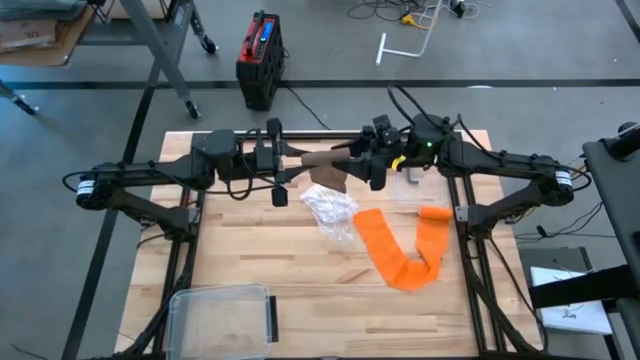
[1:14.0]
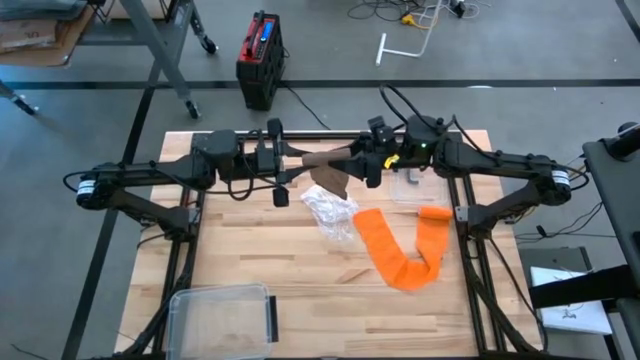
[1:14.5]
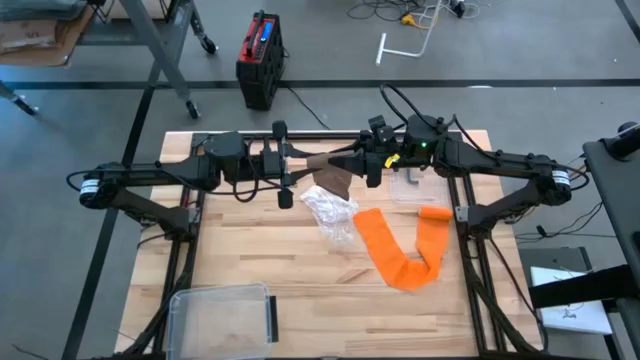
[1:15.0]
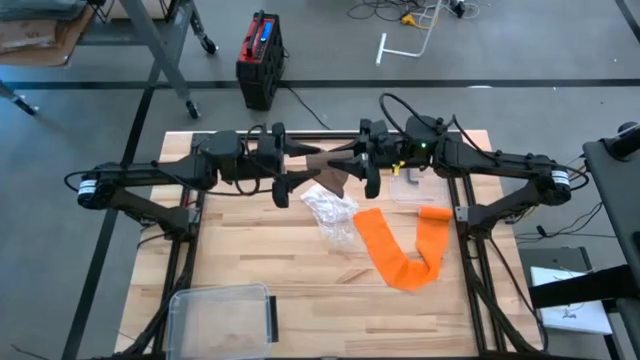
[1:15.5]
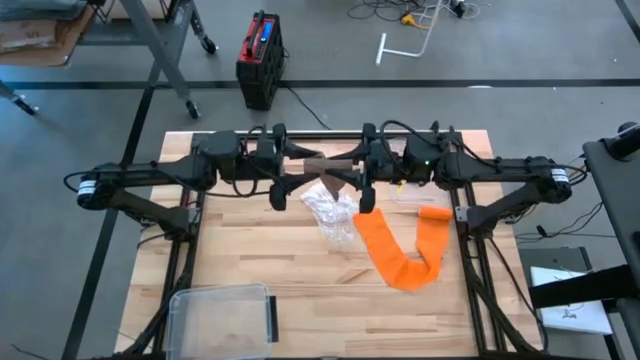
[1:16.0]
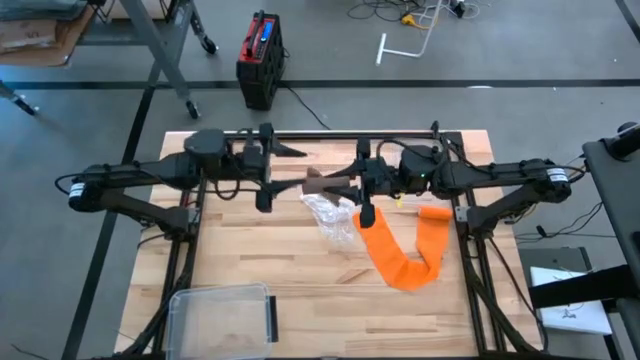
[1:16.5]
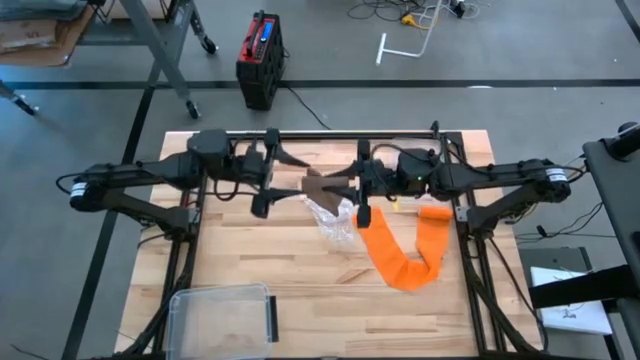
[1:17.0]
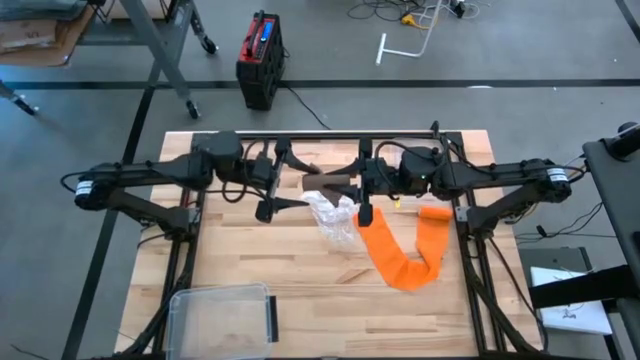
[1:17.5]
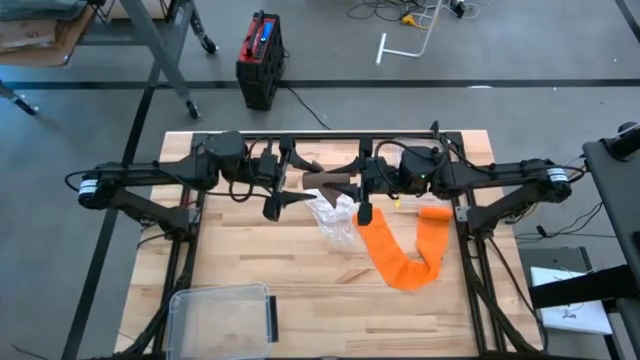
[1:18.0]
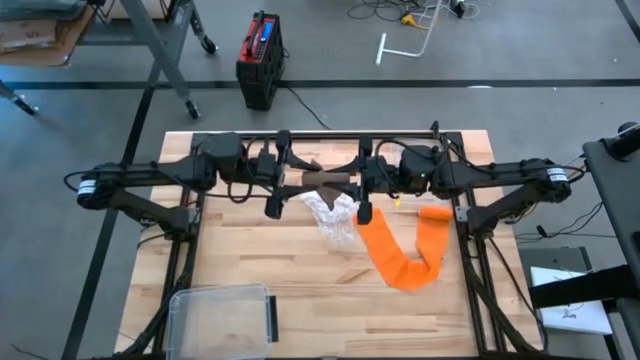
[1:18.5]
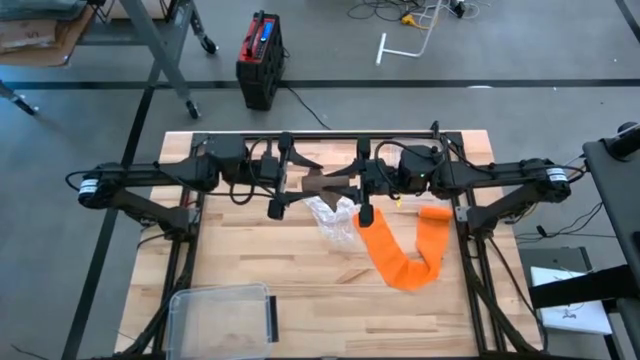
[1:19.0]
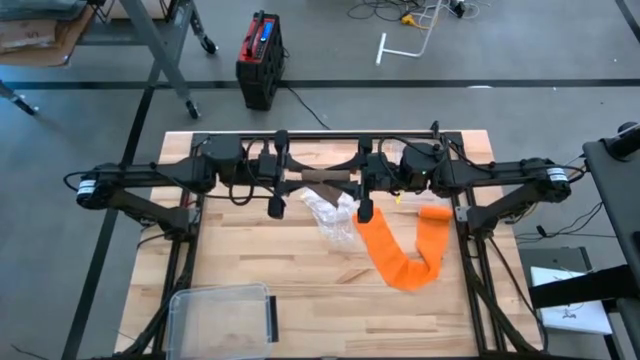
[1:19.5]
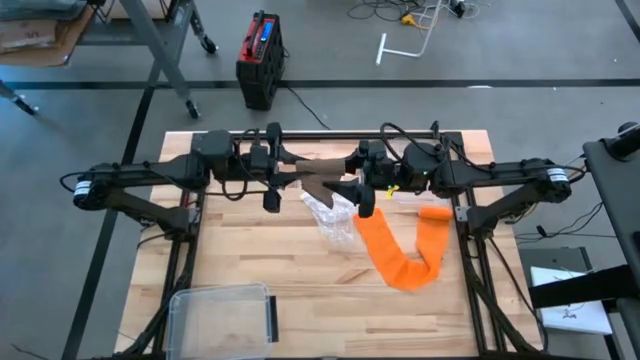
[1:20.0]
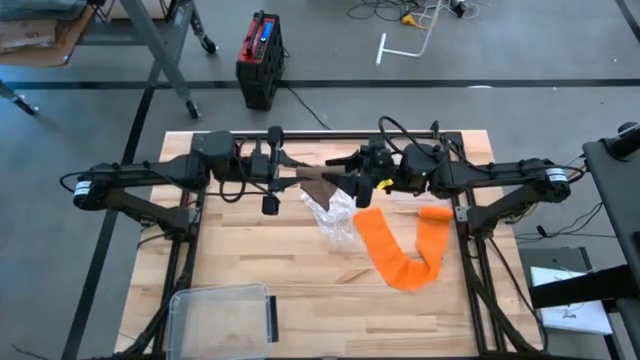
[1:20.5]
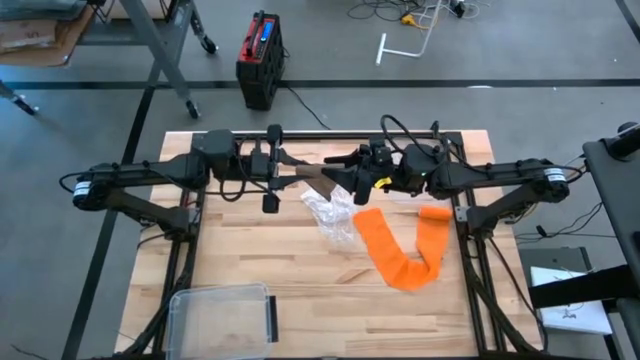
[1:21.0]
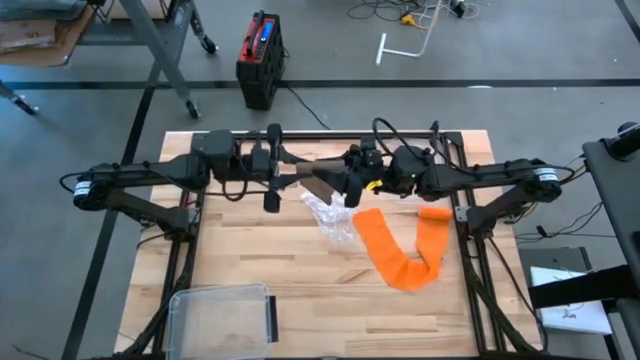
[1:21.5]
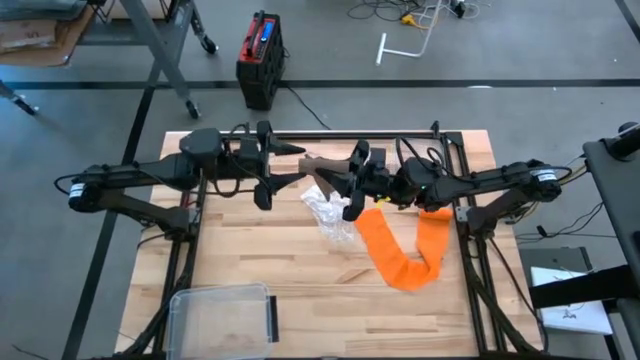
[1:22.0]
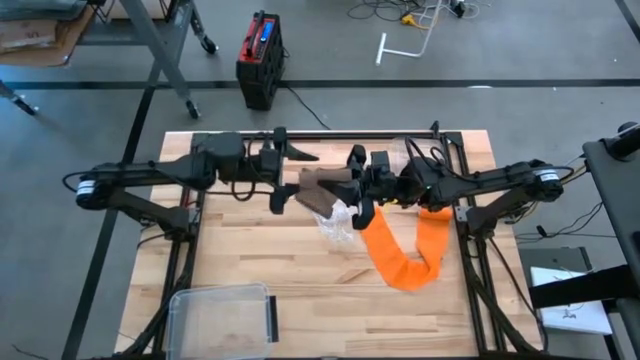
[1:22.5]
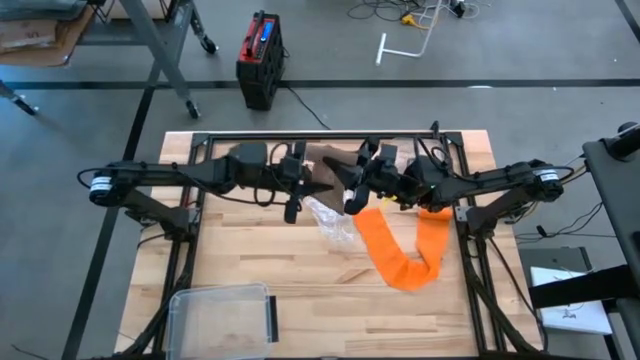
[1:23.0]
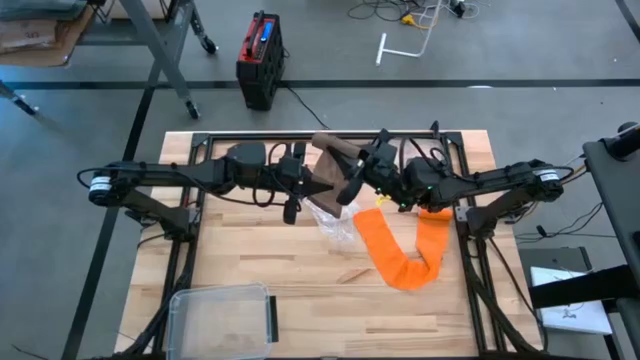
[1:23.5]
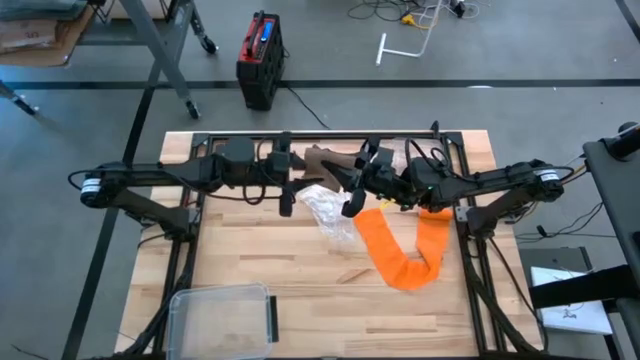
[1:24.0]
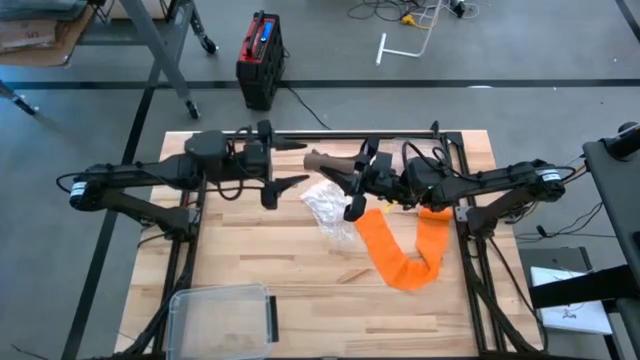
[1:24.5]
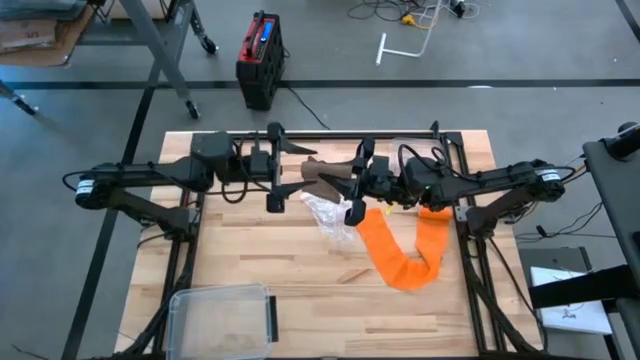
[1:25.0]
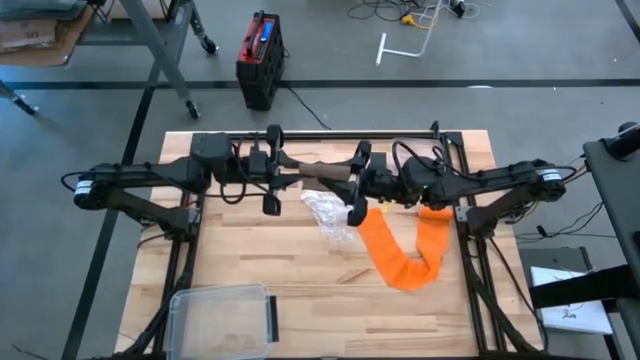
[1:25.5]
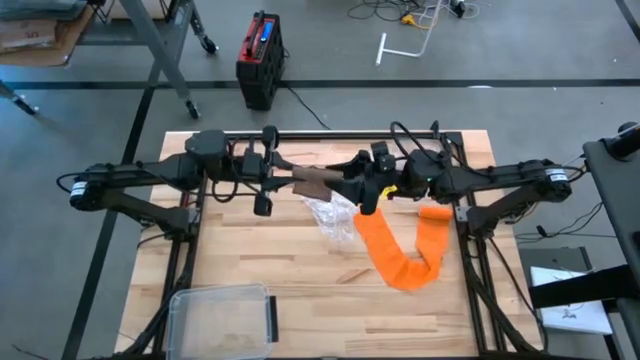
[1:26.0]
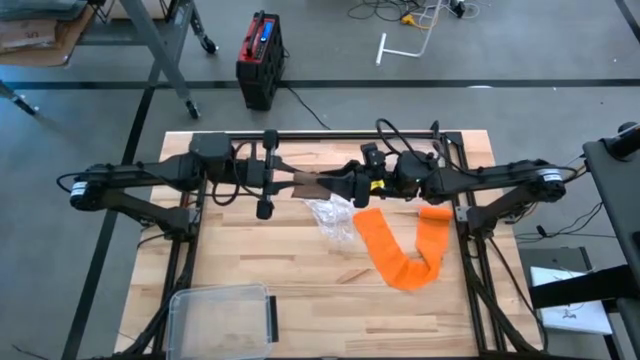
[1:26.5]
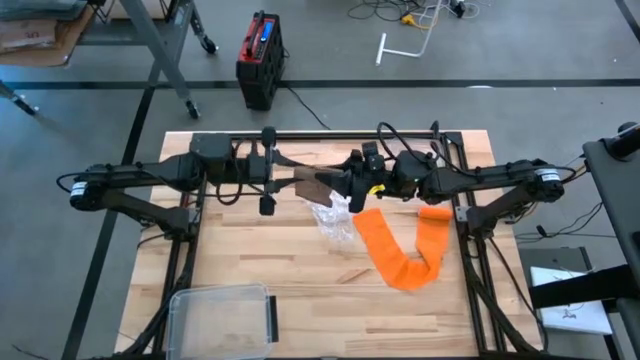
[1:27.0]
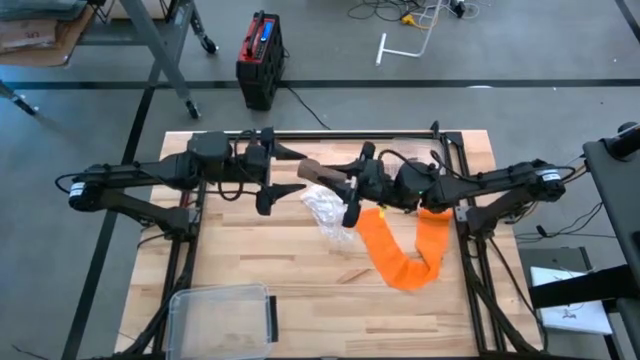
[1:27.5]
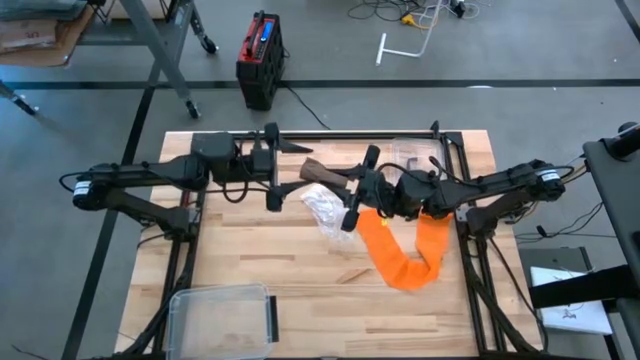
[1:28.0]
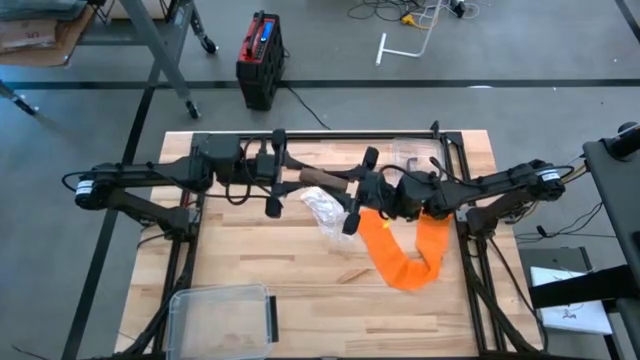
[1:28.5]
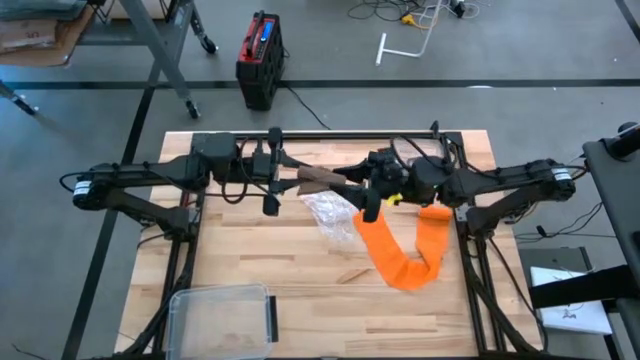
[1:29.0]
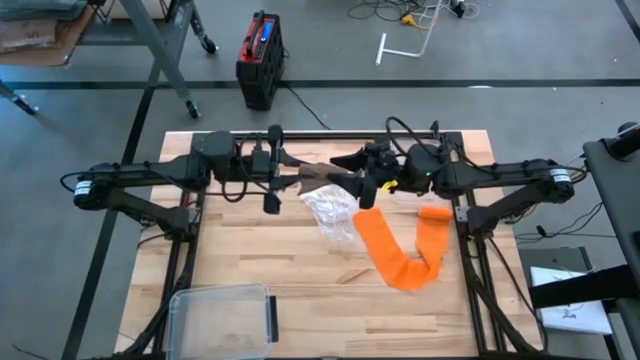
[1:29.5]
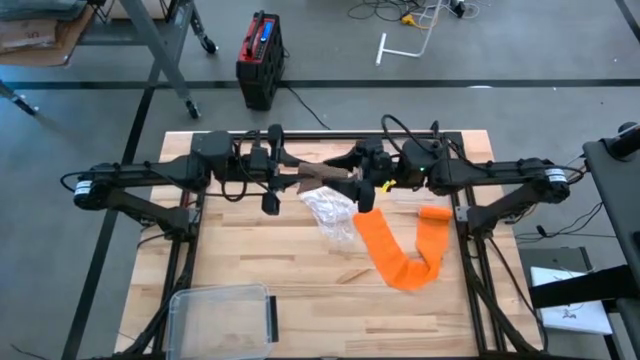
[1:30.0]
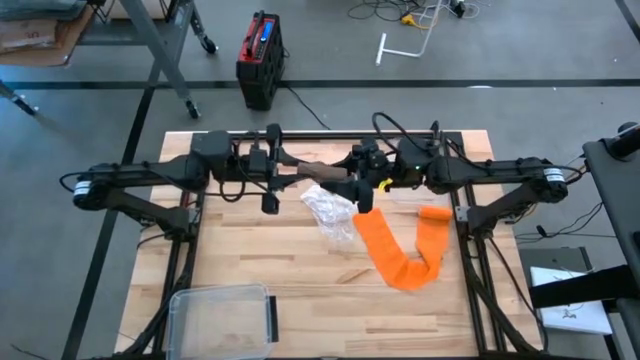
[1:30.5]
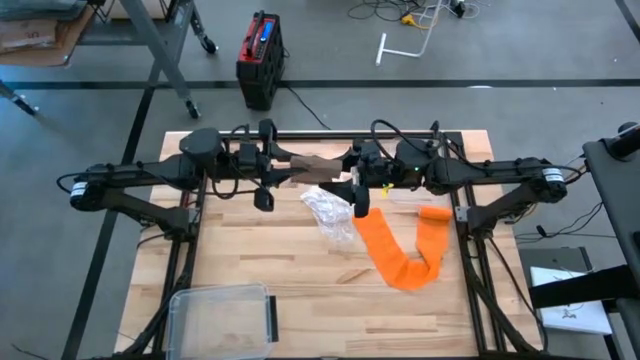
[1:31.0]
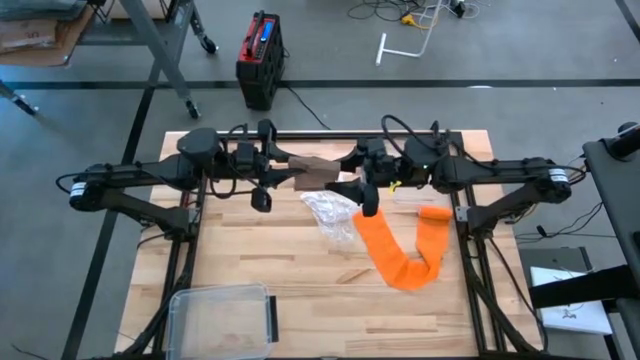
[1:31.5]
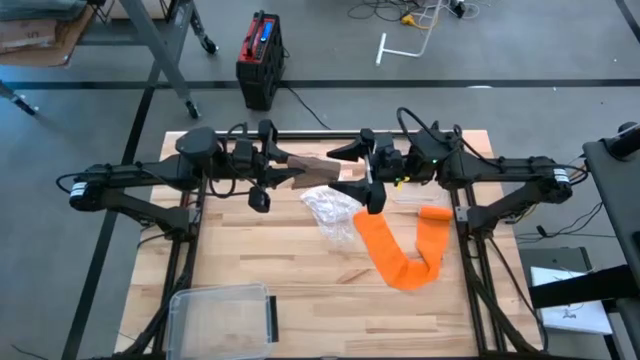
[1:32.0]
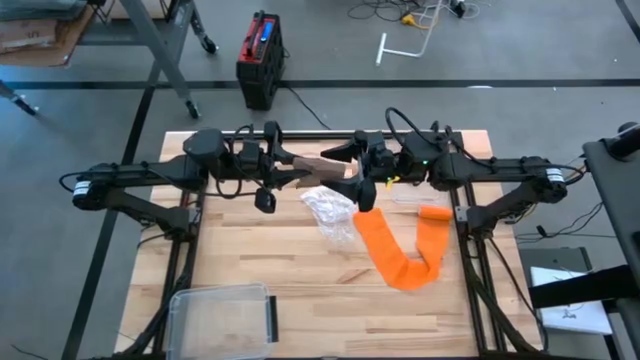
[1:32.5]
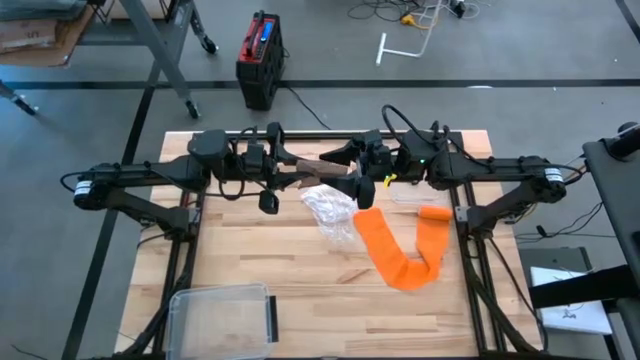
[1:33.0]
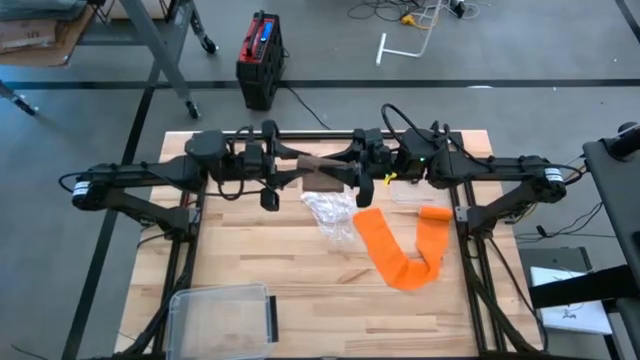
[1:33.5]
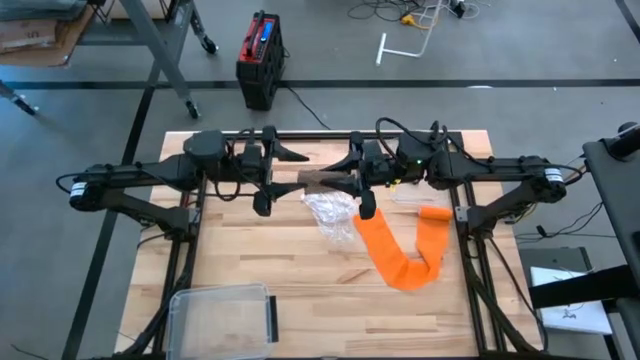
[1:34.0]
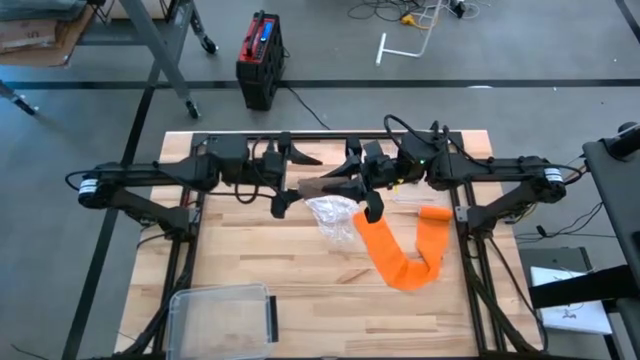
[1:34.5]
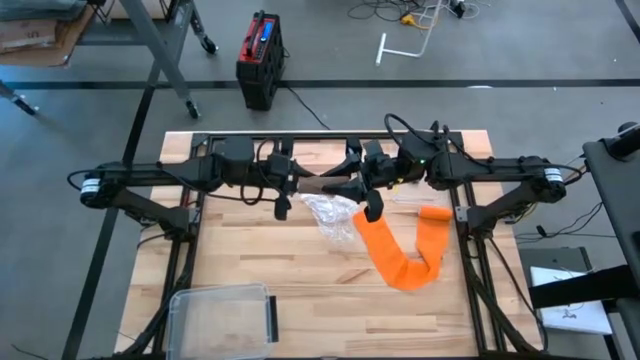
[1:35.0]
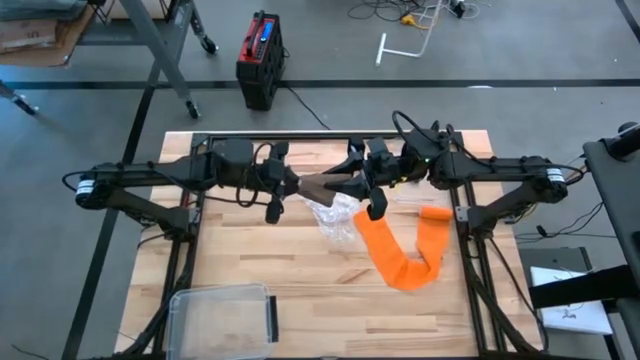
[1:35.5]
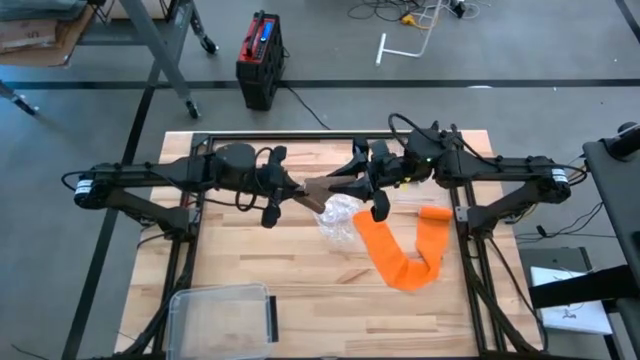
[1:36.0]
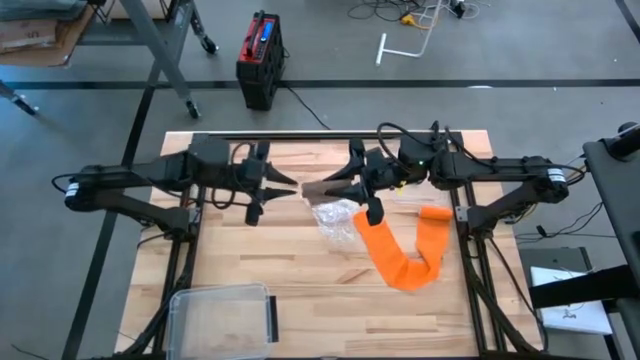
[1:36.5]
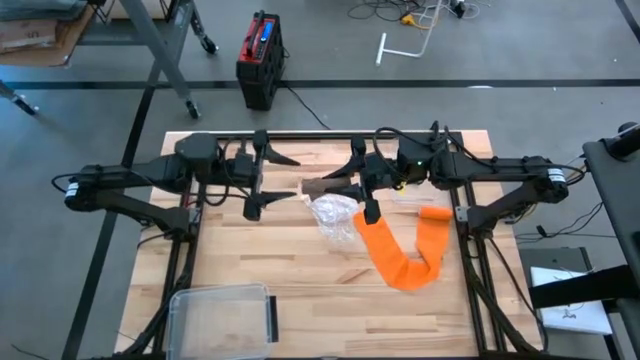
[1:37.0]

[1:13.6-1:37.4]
Task: Roll bandage
Roll the brown bandage
